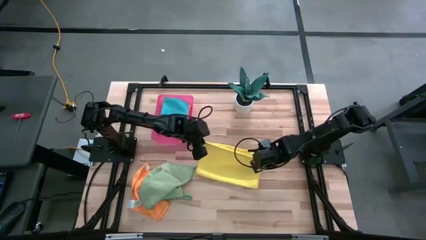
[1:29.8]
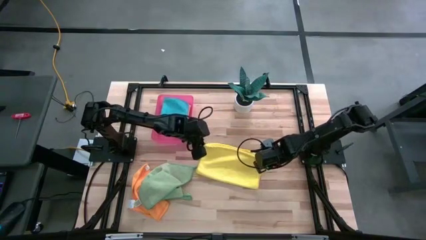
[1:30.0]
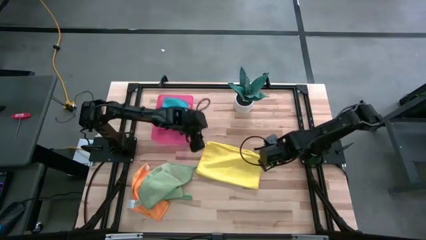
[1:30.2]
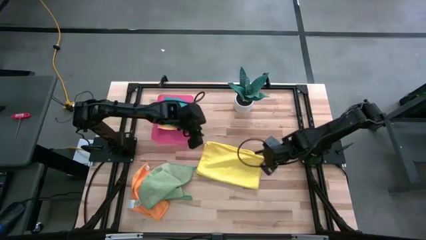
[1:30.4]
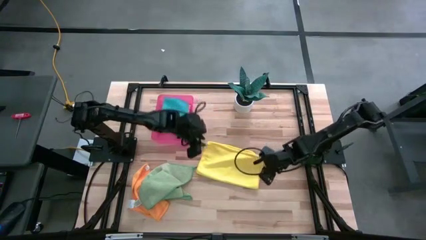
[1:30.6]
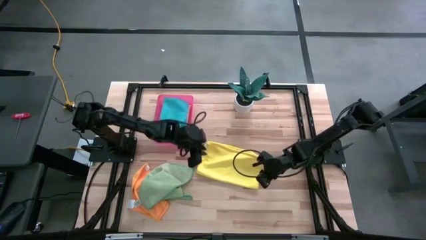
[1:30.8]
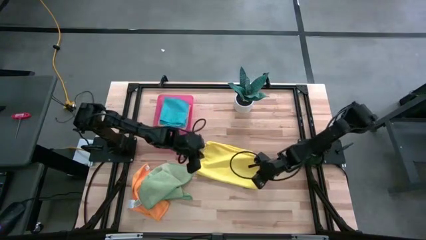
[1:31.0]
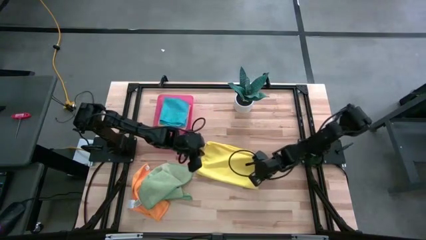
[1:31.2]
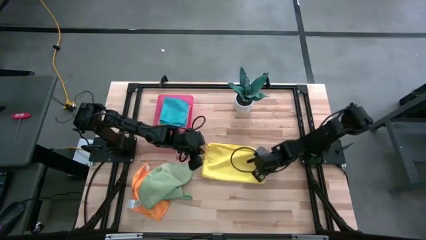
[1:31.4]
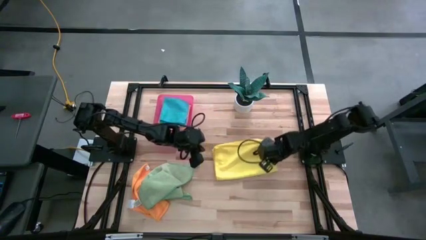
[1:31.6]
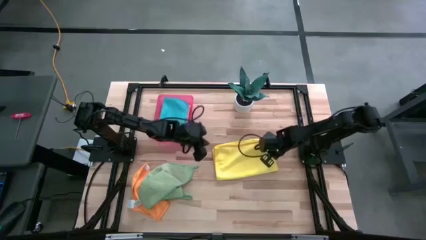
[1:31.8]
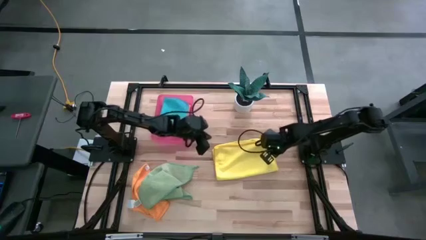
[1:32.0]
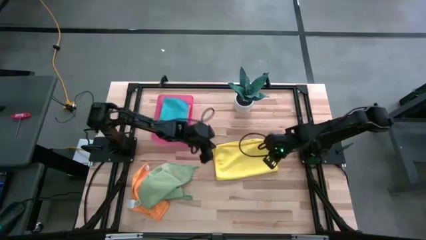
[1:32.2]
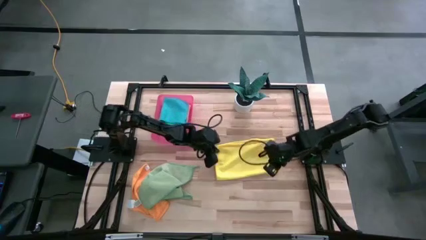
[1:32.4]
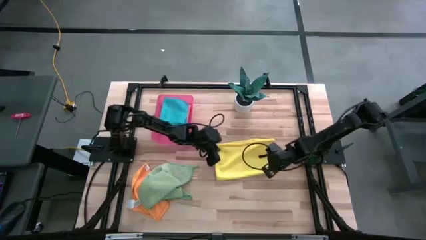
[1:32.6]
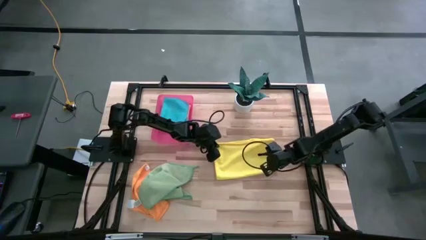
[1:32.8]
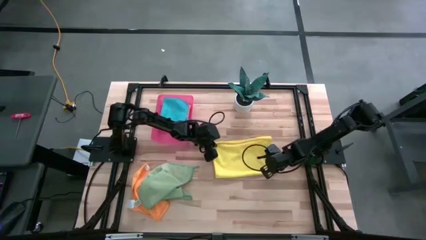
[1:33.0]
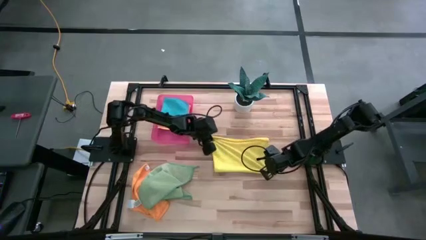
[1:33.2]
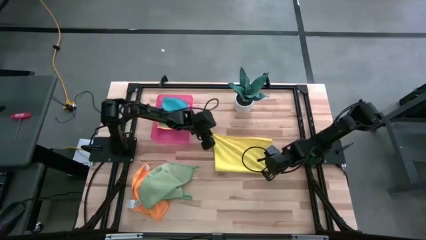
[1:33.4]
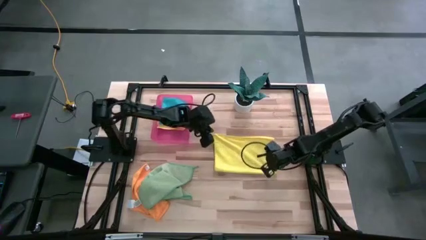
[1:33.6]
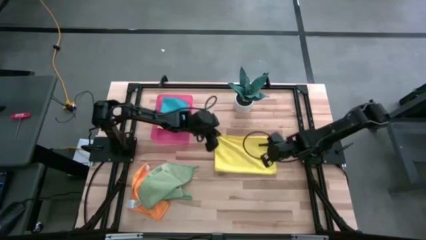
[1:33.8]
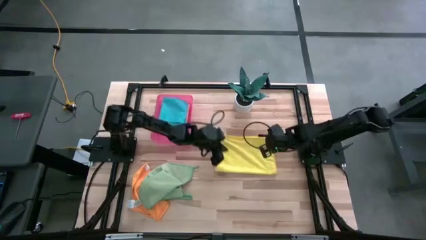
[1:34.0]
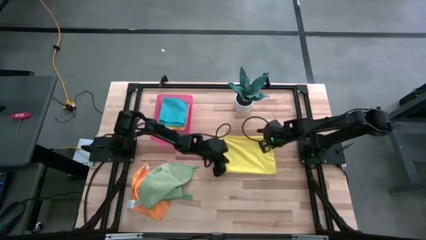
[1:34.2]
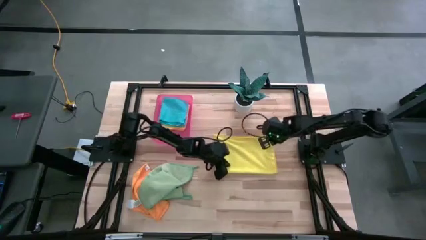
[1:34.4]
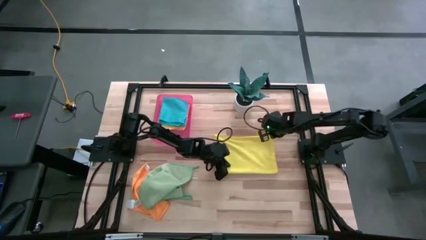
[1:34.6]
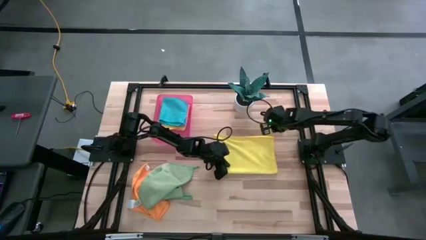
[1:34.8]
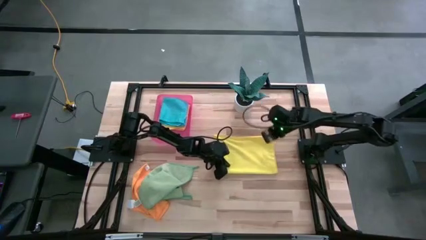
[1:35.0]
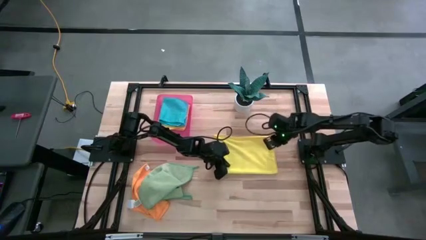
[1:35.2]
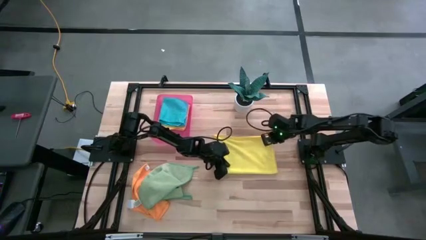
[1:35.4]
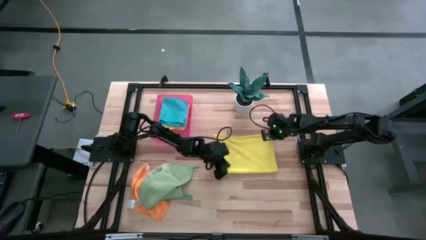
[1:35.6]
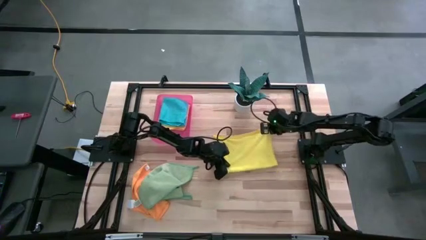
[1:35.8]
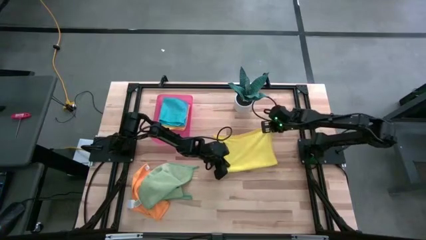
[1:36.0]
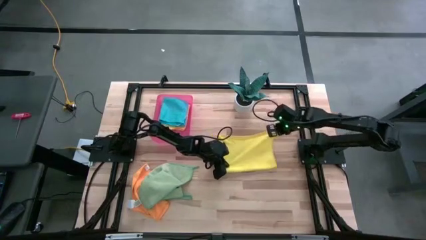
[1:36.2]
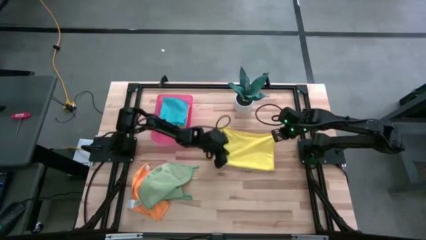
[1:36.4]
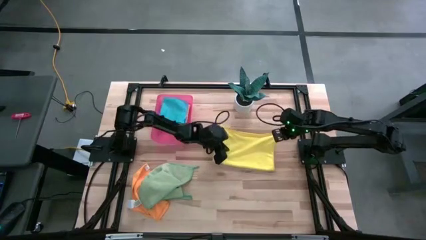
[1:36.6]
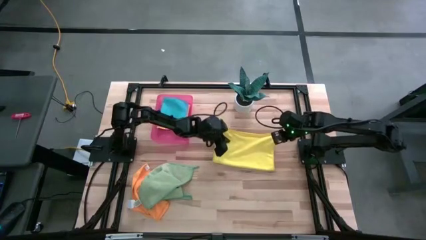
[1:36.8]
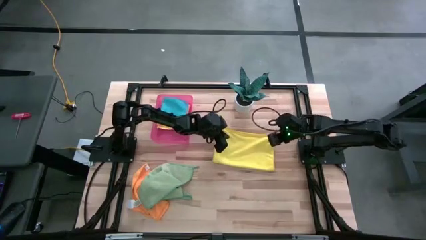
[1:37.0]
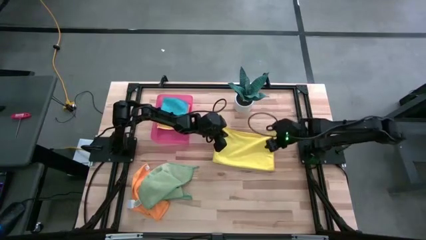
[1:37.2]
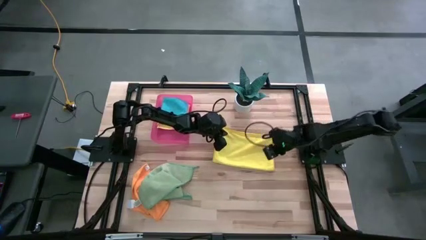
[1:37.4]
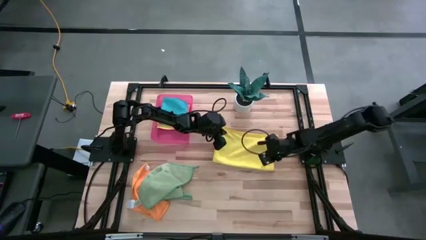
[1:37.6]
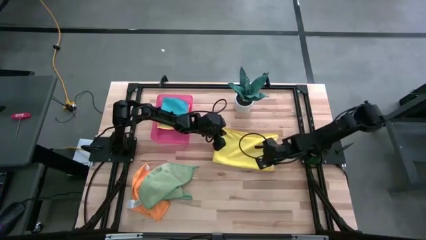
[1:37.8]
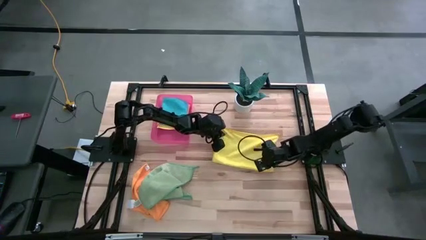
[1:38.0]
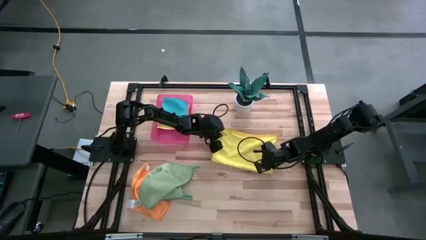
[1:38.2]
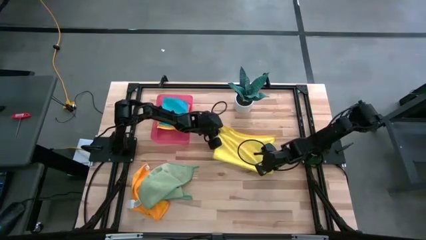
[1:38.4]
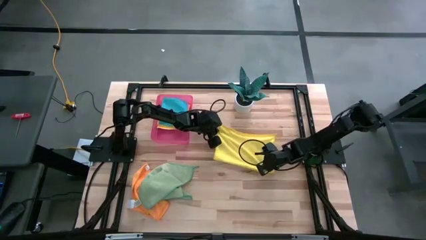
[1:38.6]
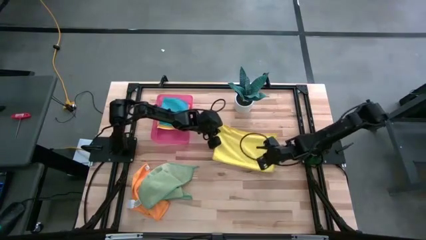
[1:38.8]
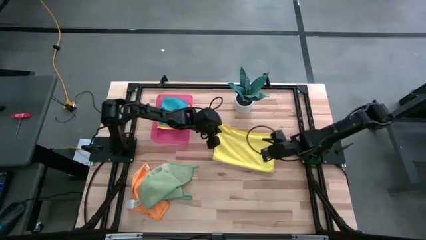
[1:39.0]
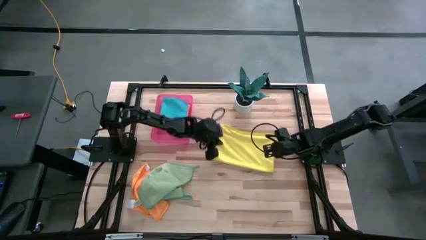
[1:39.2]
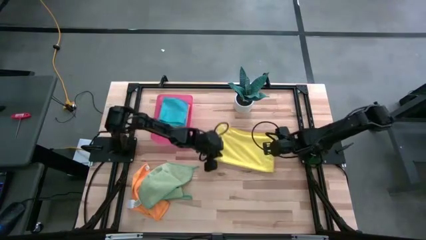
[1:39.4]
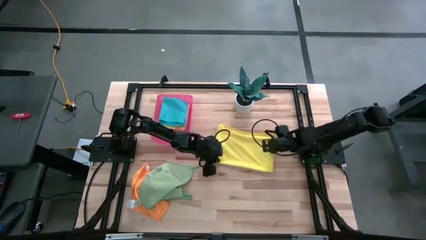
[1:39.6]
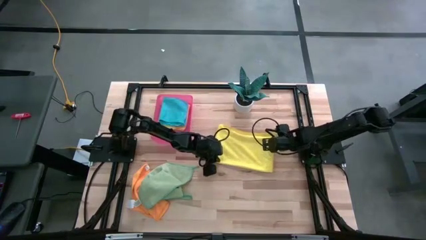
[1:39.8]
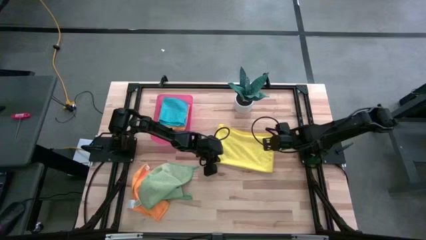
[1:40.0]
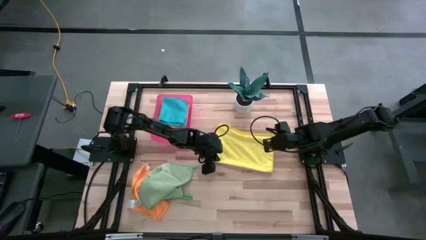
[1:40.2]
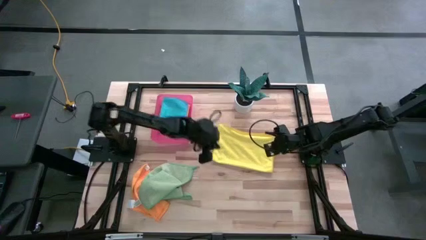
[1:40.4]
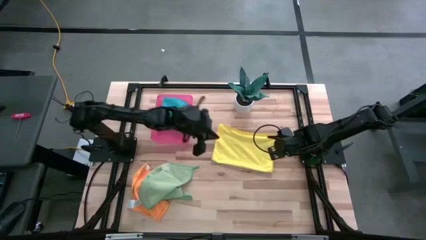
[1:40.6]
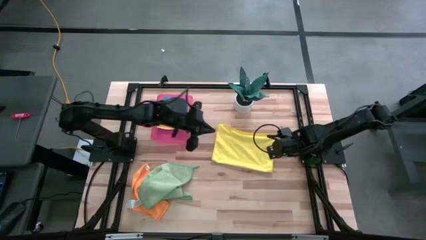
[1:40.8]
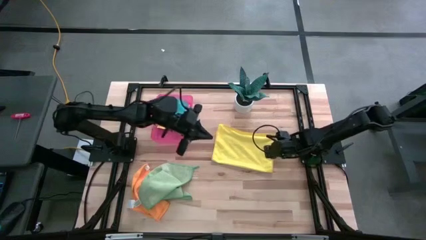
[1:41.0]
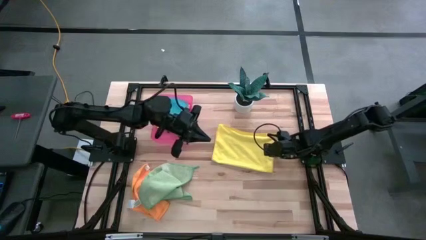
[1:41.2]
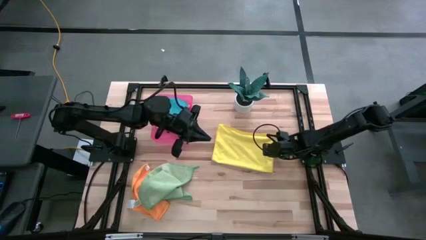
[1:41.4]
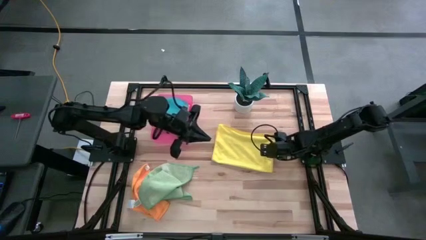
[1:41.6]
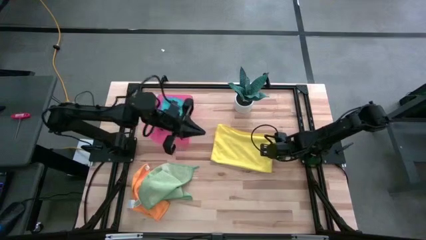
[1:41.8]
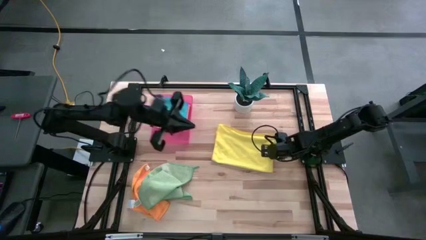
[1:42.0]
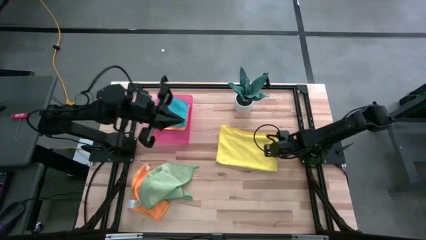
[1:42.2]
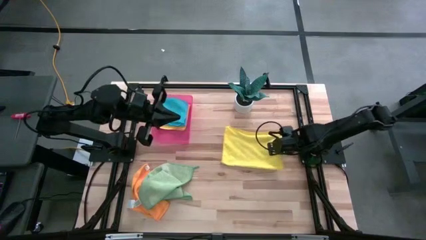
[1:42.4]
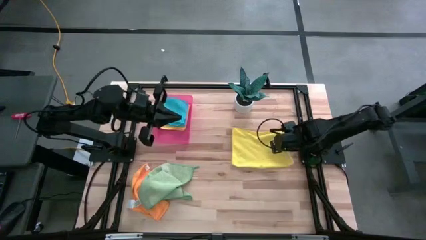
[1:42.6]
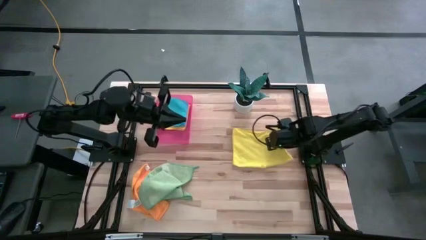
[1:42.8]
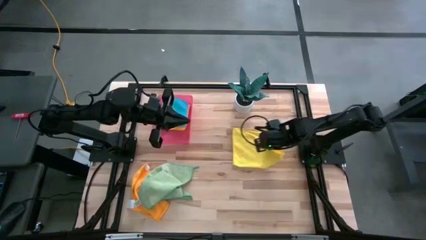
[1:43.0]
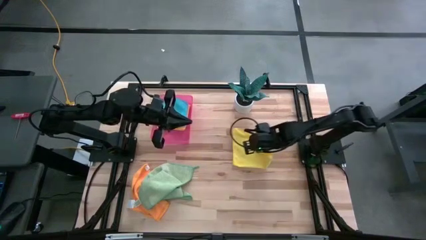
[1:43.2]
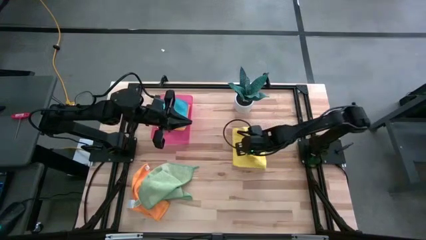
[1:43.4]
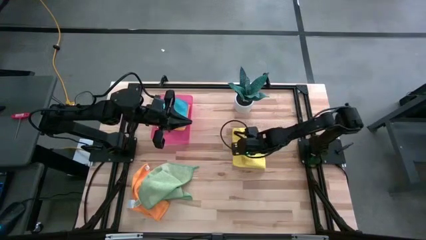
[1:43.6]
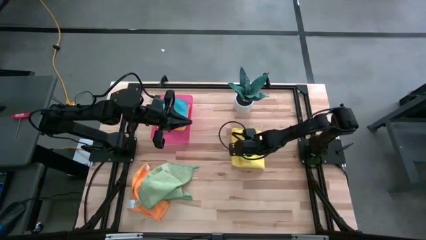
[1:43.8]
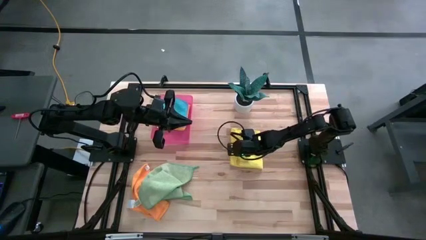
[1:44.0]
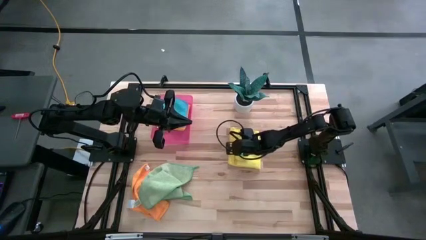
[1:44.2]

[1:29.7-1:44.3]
Task: Fold microfiber towels
Fold the yellow microfiber towel

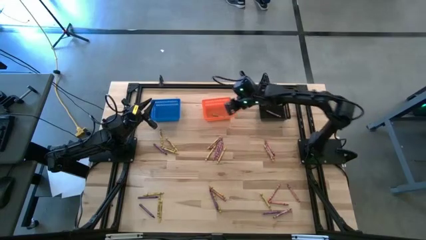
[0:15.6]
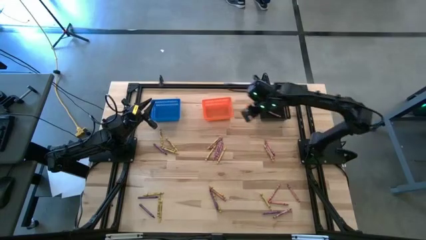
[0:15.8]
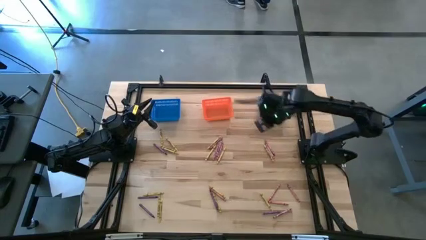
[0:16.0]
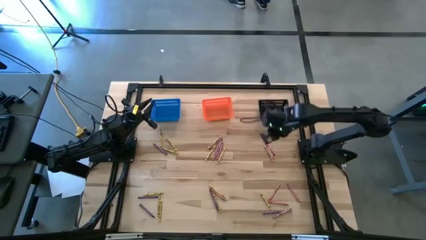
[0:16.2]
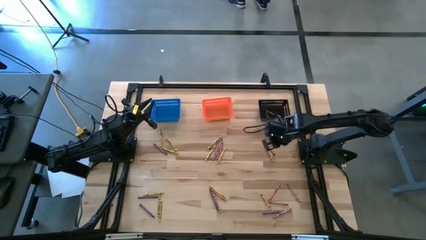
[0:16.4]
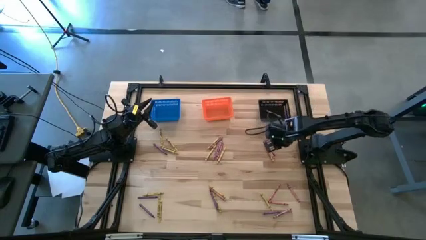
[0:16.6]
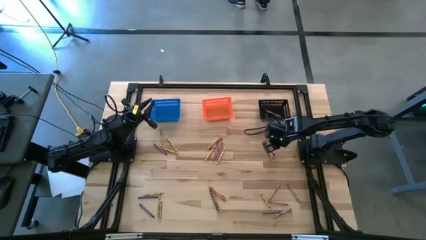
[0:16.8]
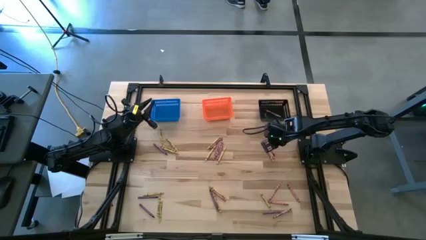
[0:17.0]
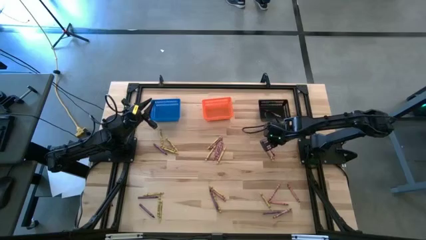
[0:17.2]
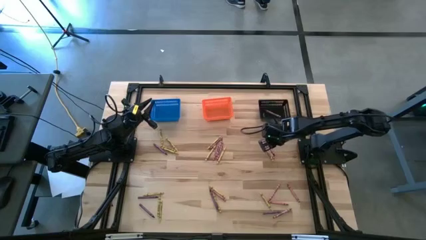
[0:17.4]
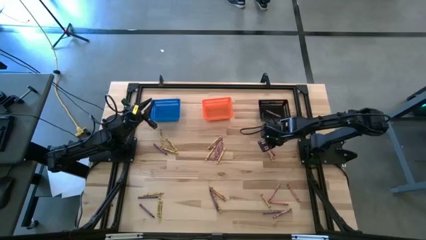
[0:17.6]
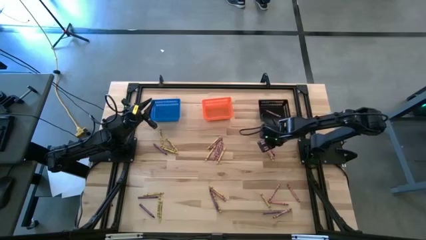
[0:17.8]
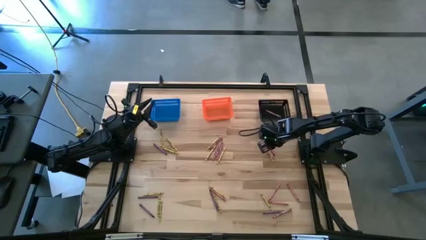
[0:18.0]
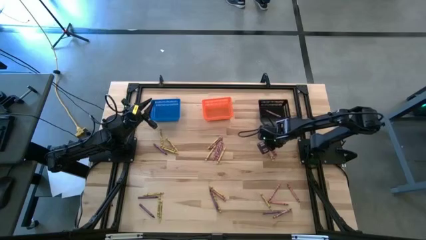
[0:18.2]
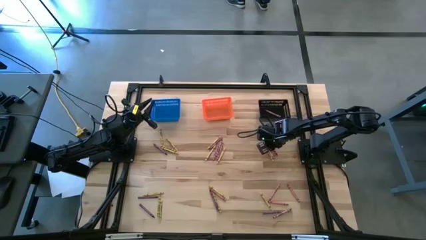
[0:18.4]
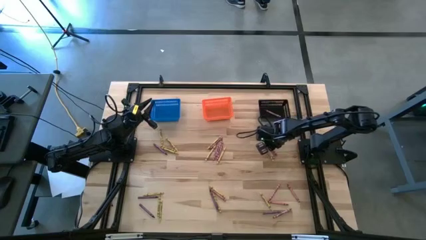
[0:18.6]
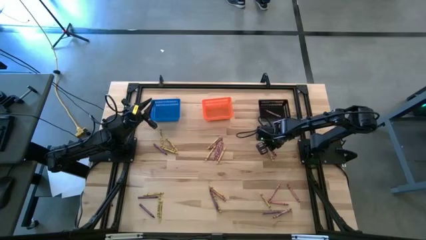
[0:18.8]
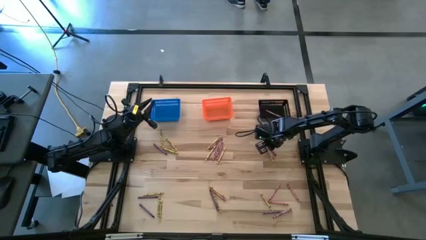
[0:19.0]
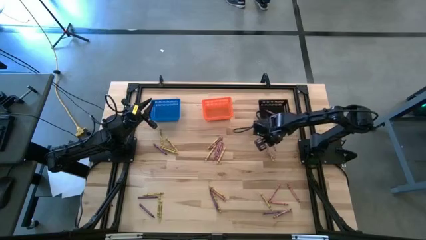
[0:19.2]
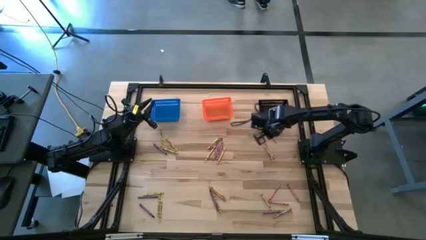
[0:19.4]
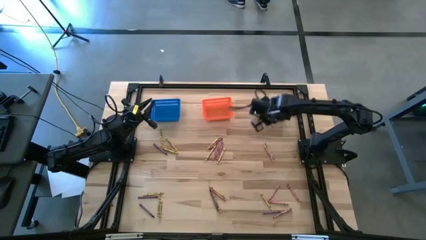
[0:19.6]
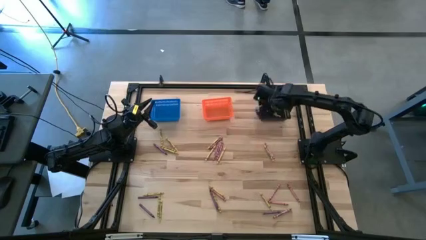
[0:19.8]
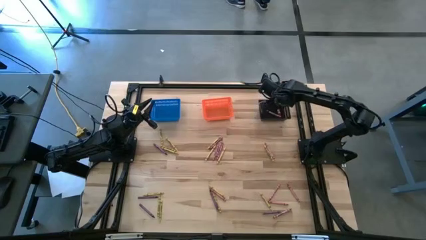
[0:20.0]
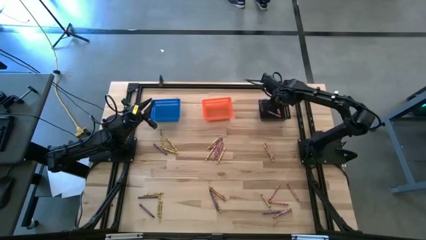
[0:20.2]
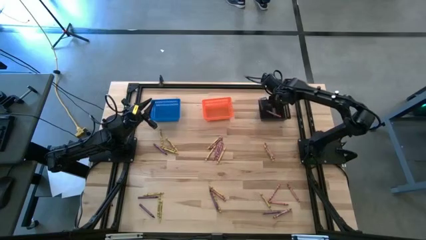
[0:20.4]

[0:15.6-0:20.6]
Task: Sort crayons
Put the red crayon into the black bin
